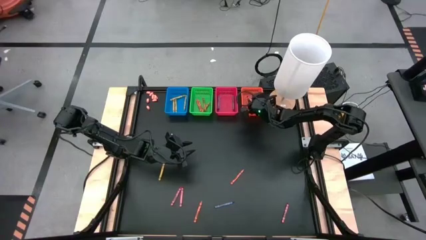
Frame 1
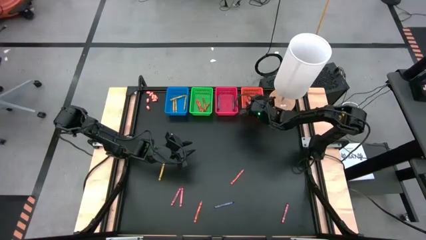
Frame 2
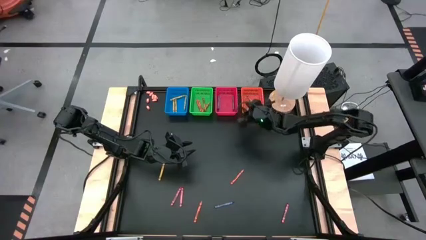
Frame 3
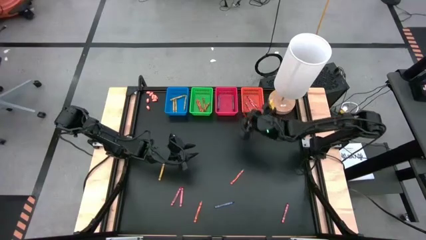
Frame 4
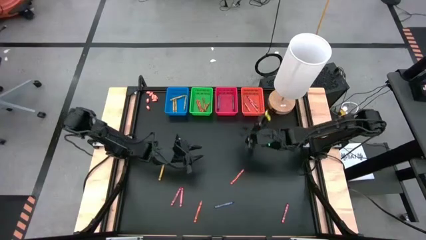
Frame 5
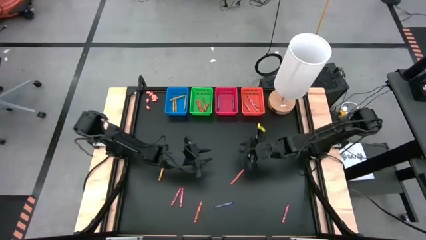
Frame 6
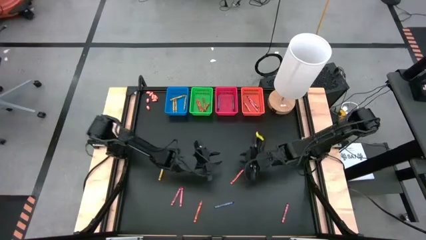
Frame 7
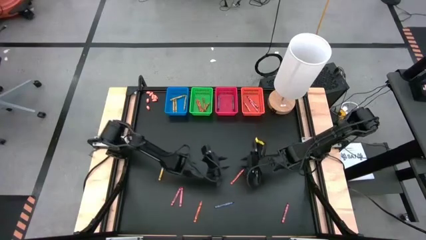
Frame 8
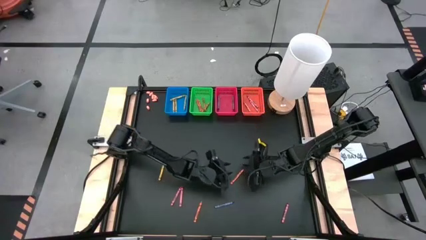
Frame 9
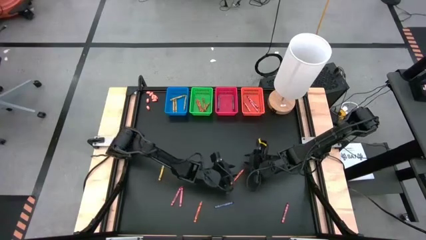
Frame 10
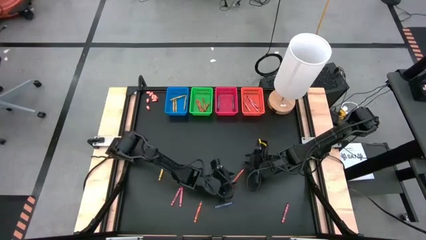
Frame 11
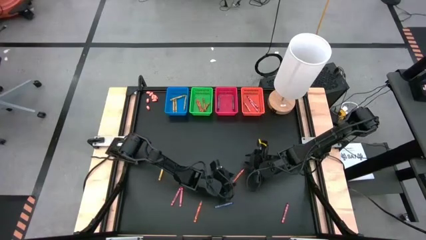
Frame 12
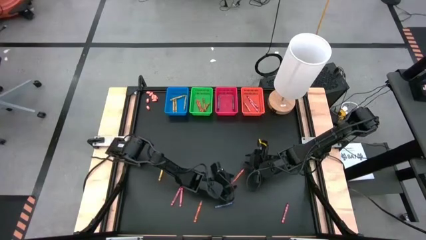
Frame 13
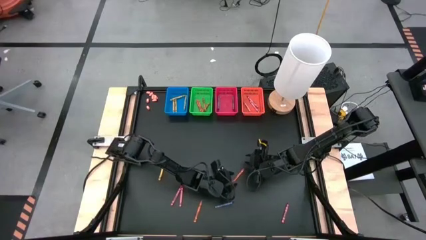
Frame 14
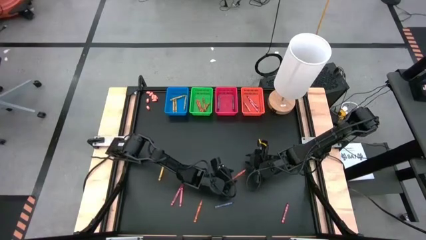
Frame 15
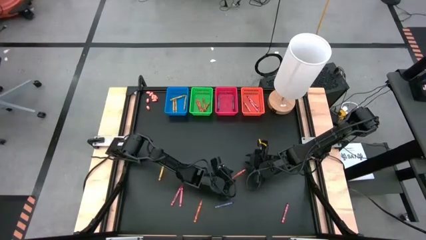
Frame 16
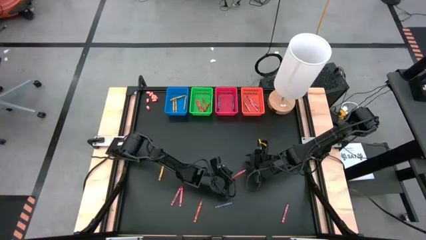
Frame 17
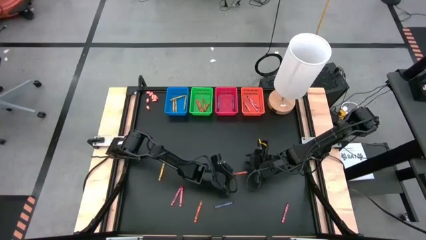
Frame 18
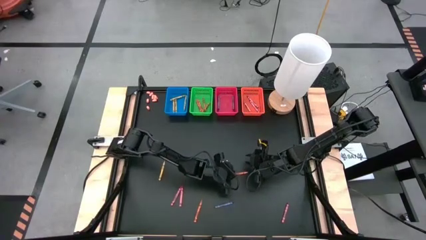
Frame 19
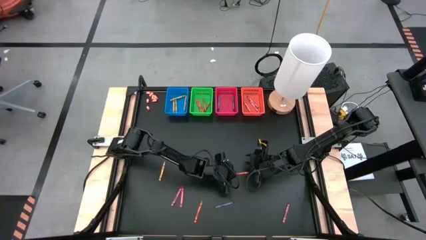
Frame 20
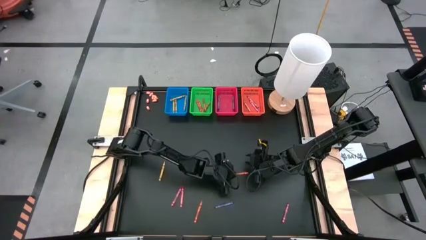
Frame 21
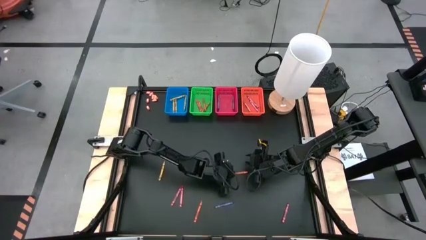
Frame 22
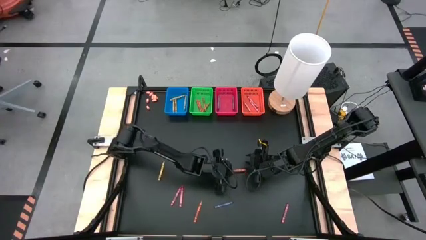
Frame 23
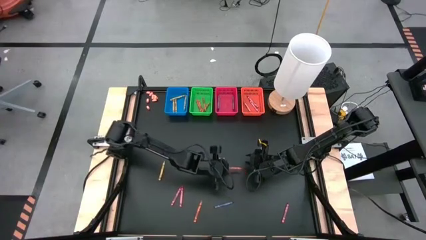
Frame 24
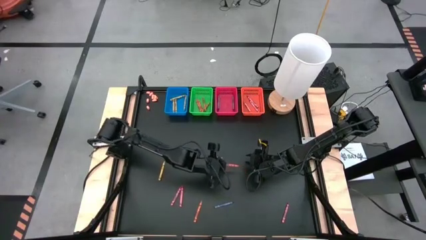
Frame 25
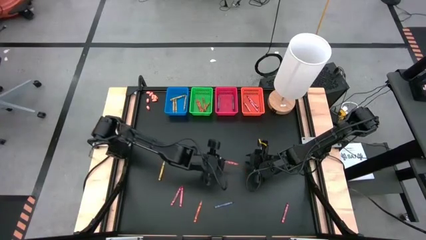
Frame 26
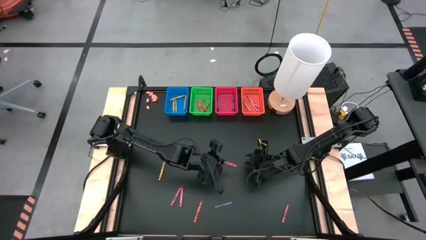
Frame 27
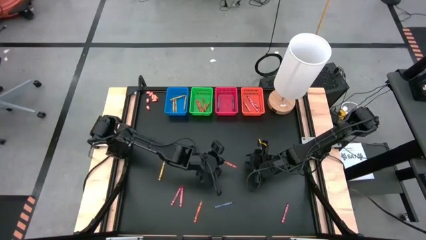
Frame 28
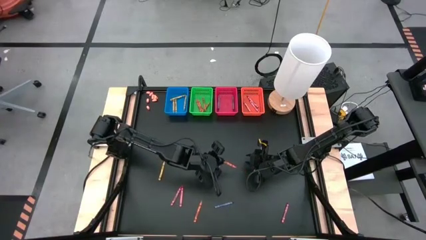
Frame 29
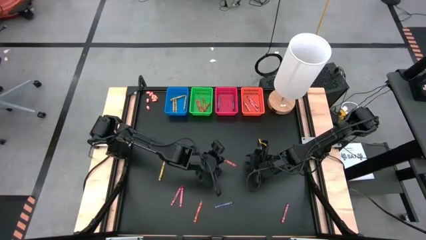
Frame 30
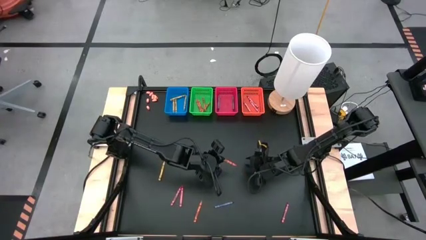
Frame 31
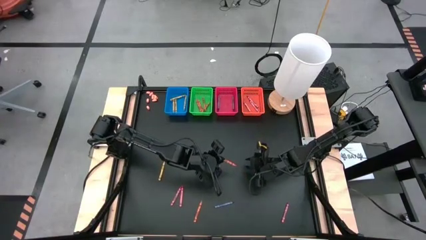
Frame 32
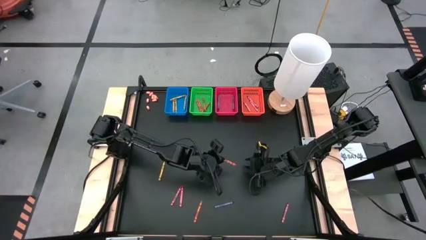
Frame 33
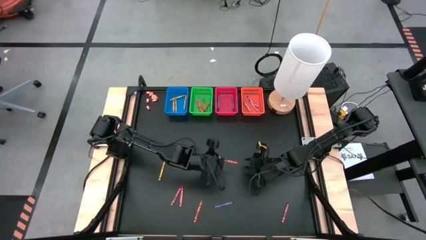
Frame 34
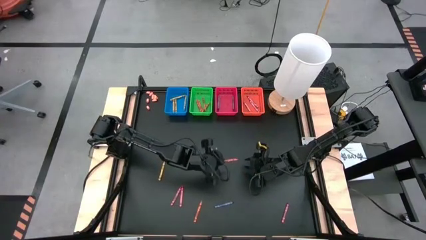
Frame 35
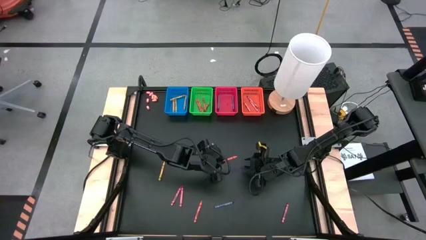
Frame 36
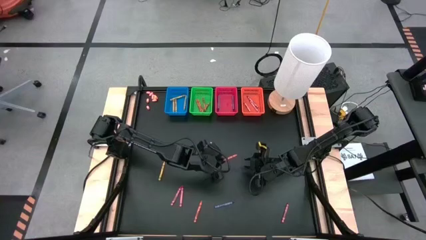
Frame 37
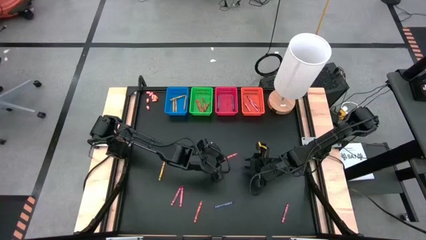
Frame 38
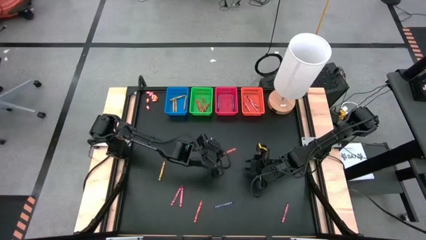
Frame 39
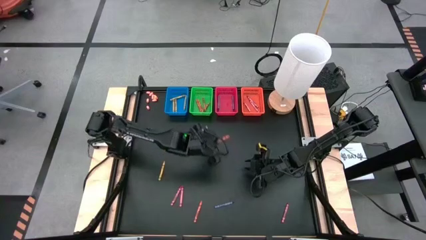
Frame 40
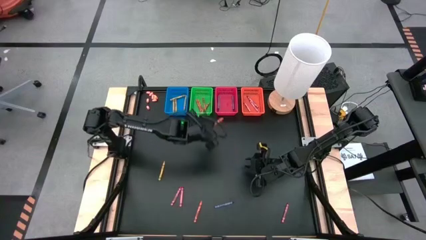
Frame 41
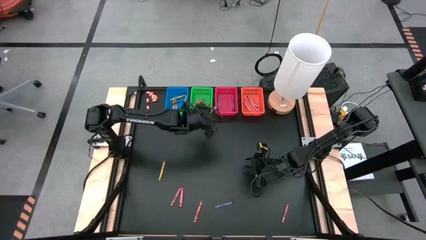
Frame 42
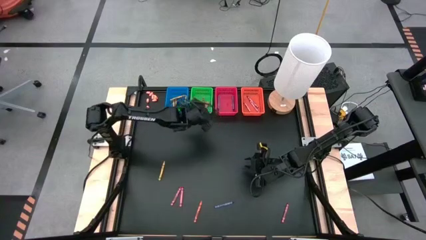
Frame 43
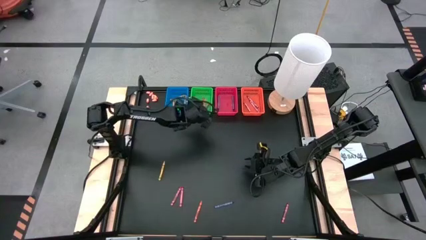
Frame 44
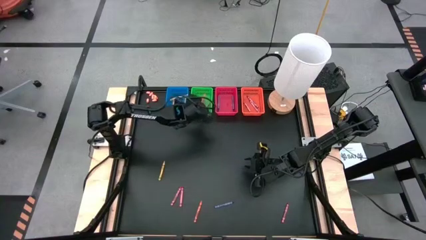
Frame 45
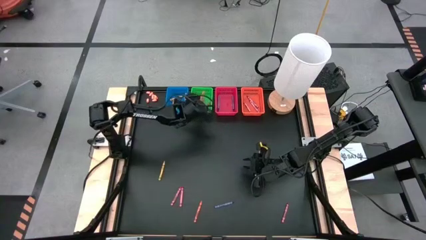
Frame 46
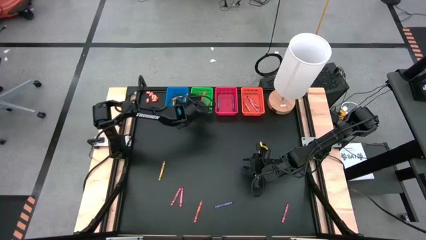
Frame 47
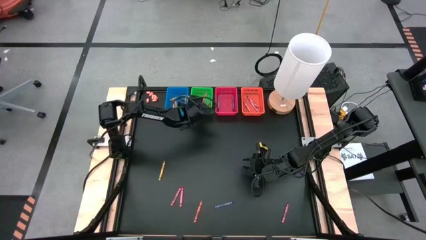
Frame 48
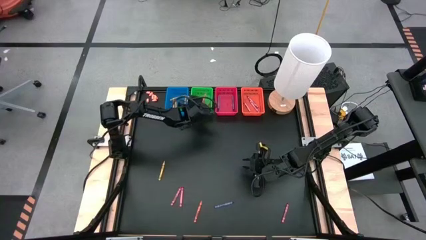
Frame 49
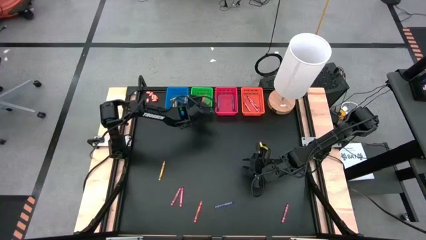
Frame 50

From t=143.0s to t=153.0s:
Task: Sort crayons
Put the orange crayon into the green bin

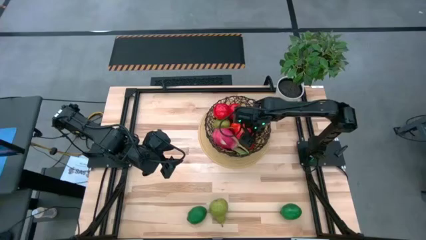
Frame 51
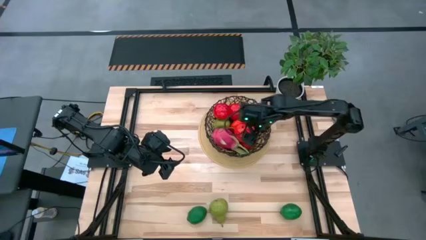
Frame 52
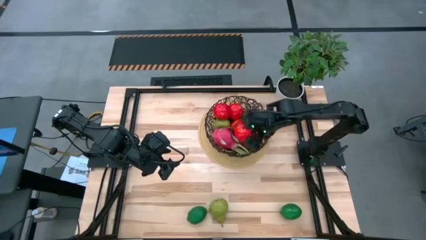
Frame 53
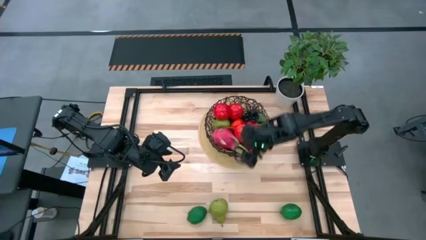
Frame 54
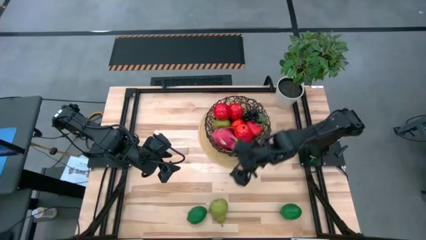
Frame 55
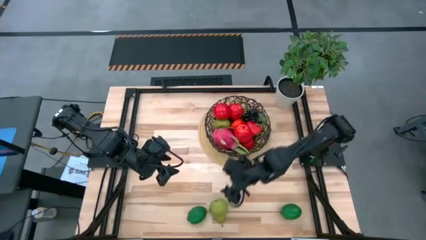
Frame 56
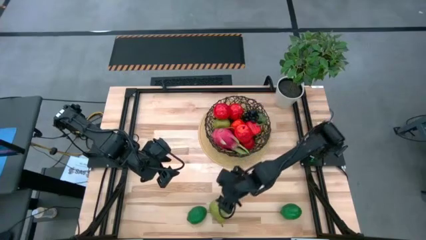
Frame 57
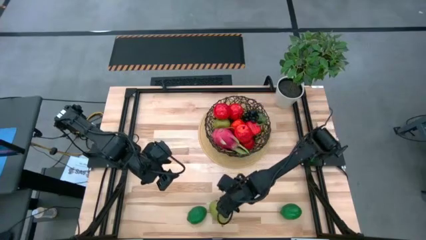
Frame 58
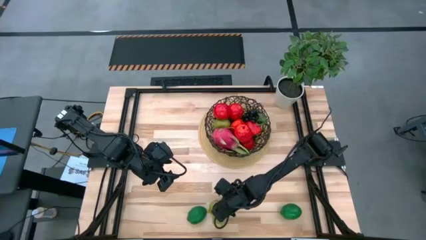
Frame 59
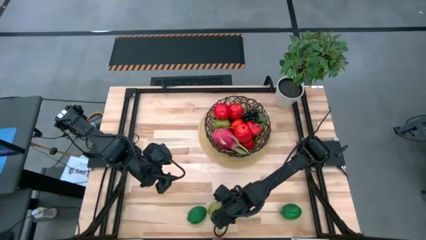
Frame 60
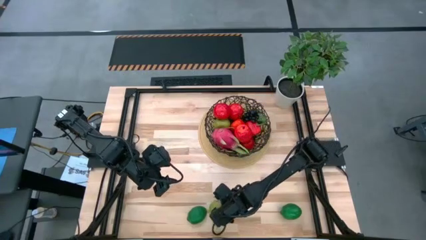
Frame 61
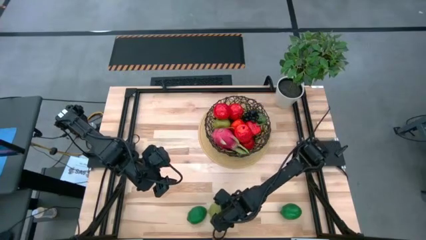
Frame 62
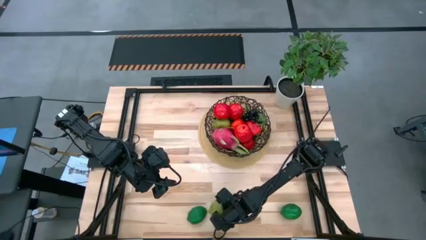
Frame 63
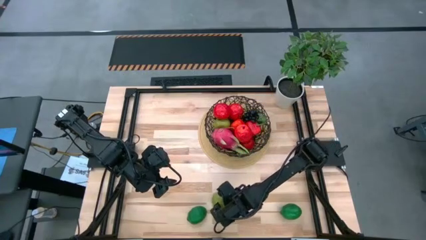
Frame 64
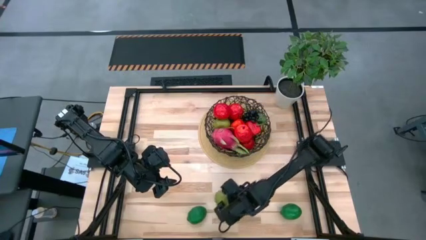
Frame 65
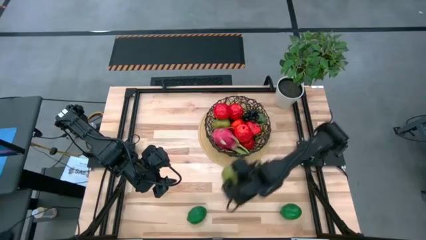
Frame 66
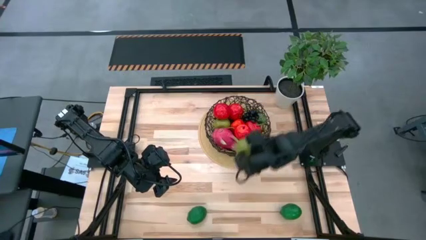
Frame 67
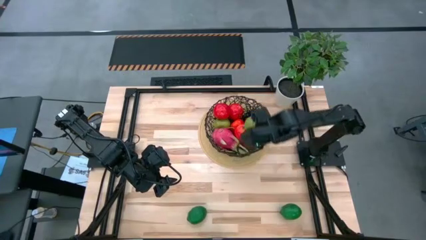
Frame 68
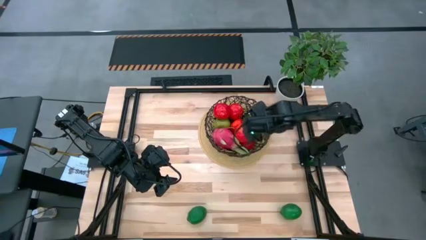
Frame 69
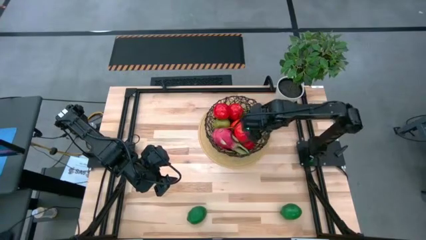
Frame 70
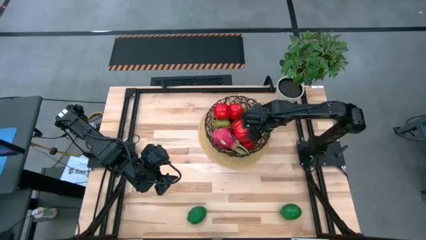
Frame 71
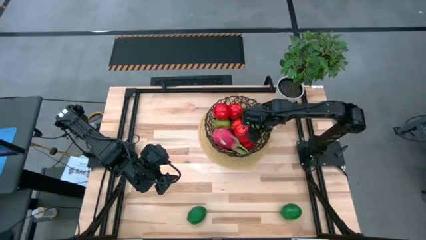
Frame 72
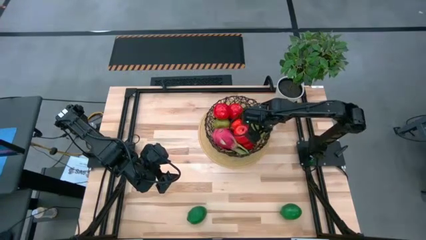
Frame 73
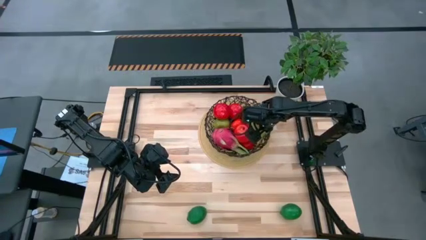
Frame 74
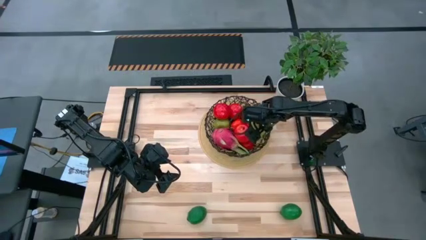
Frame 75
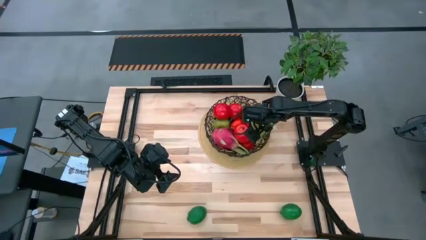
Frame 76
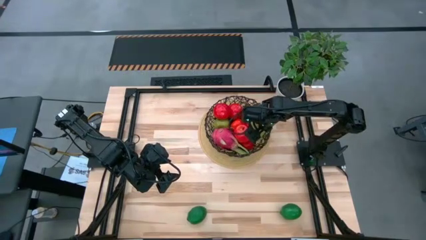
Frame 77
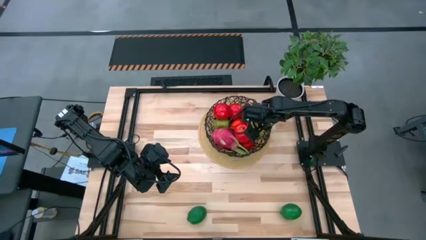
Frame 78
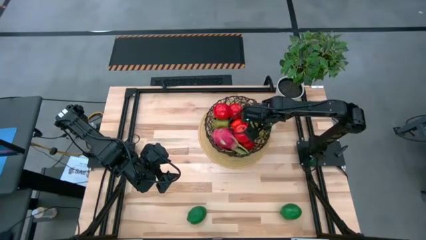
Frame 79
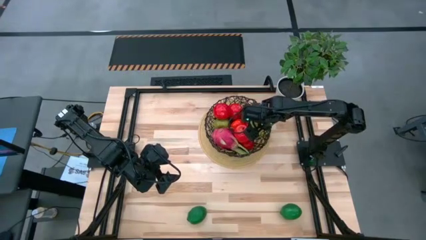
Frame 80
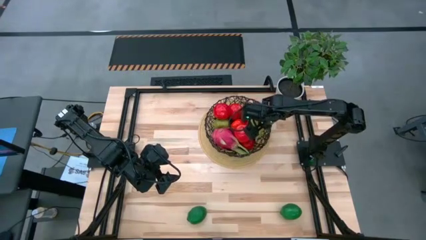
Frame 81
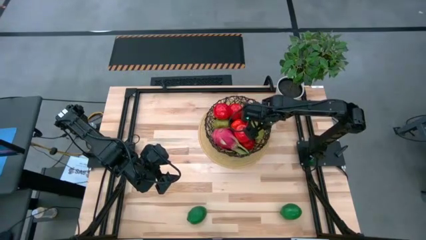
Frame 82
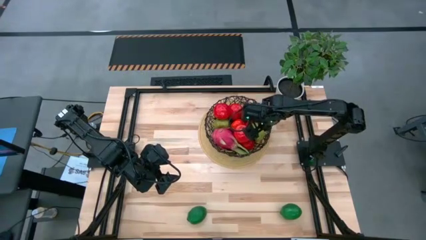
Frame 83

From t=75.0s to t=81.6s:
Task: Build produce basket
Put the green pear into the black basket
